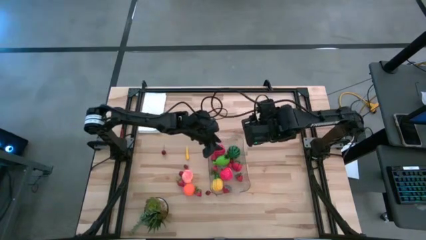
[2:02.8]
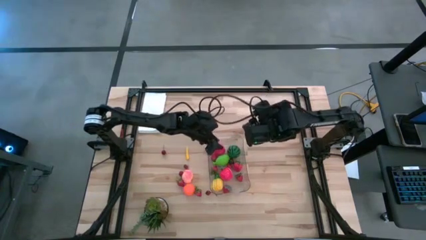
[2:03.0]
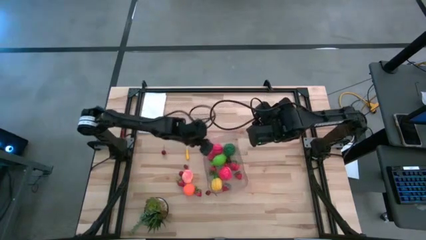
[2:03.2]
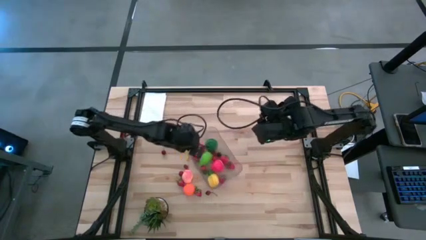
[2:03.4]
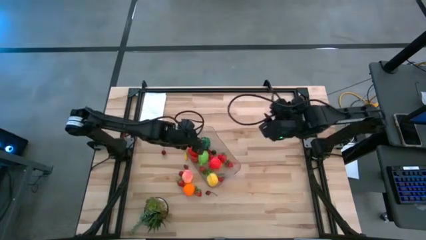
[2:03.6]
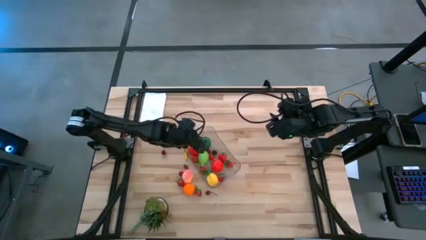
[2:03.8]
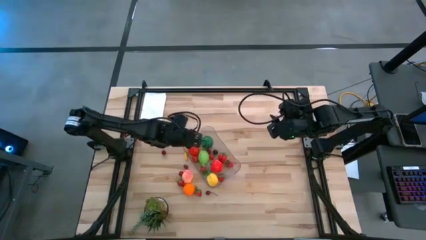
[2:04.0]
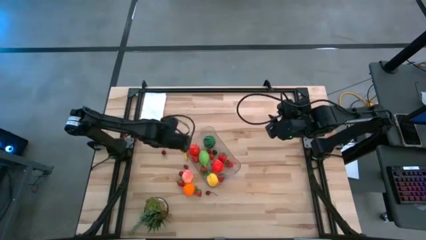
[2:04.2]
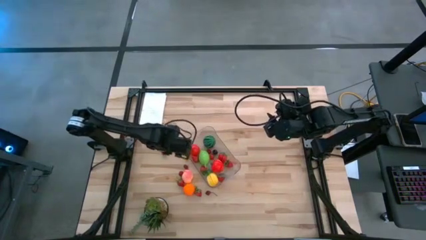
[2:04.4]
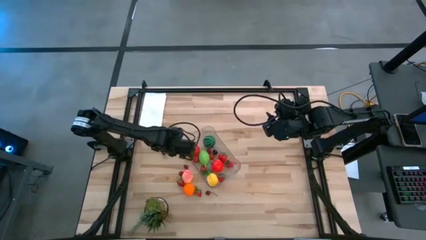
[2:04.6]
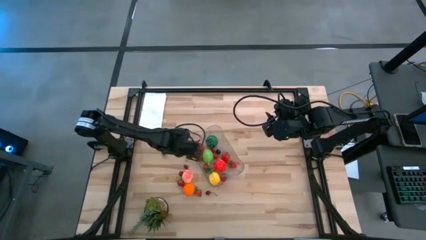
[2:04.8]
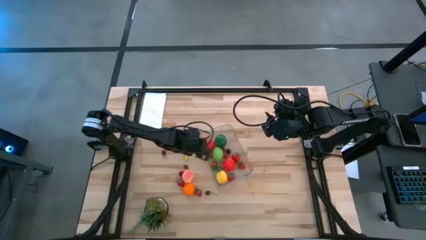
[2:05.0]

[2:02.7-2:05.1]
Task: Pick and placing Produce into tupperware
Adjust the transparent bin

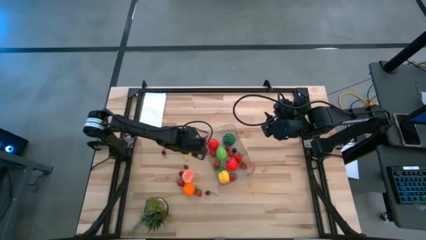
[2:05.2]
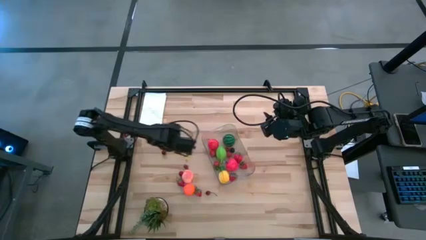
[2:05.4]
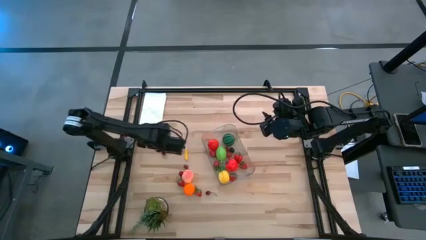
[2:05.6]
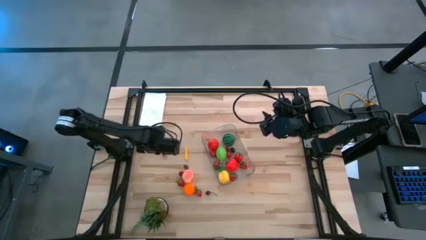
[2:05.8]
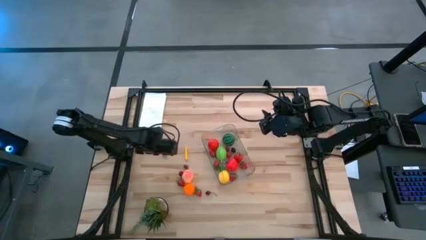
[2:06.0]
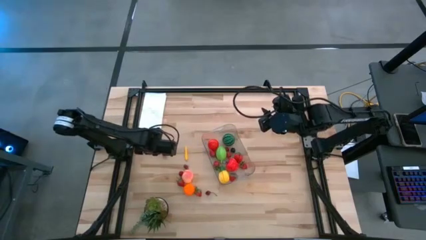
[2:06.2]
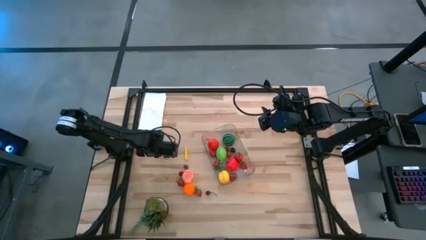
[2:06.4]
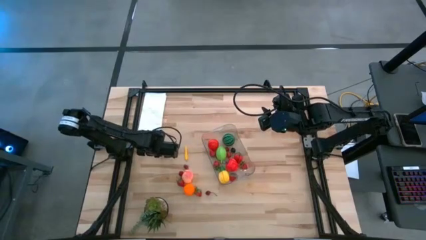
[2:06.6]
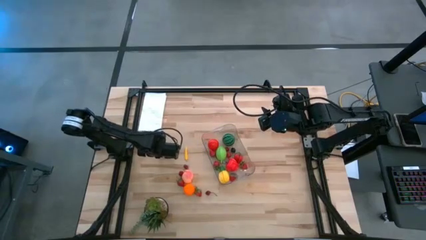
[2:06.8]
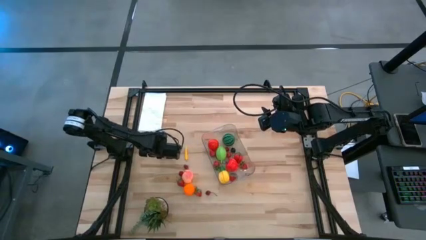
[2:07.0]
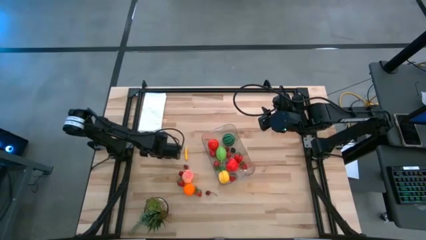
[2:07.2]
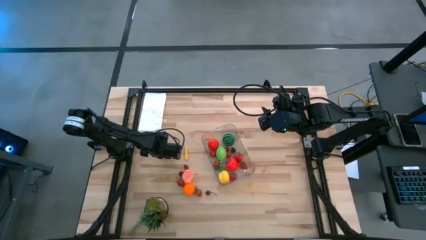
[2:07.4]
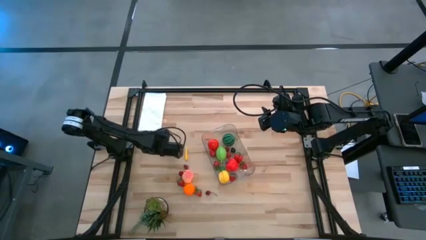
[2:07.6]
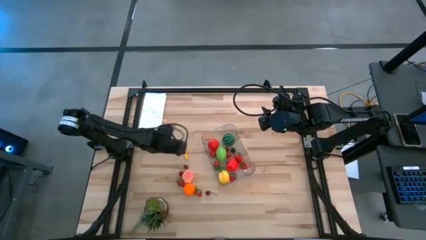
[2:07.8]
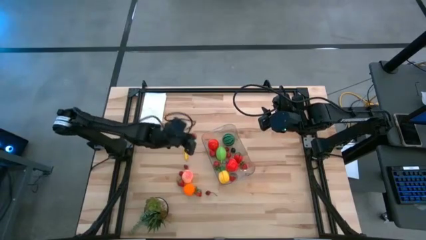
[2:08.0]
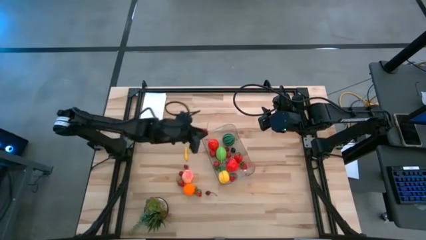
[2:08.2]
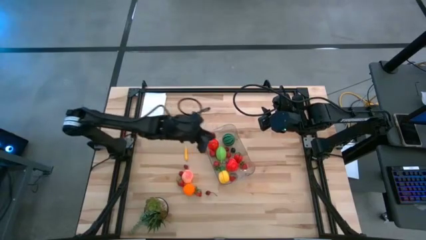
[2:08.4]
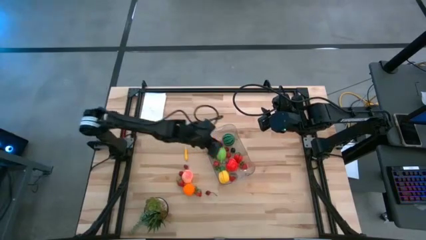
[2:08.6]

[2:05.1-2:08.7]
Put the red cherry into the transparent bin

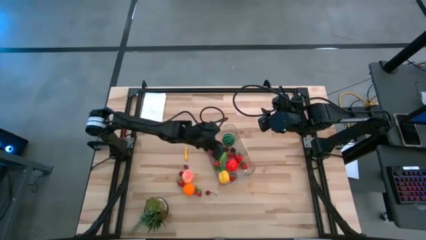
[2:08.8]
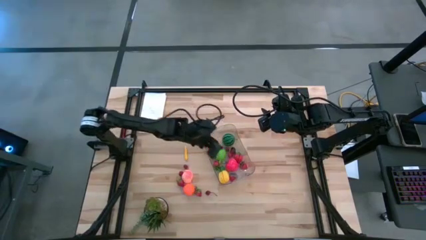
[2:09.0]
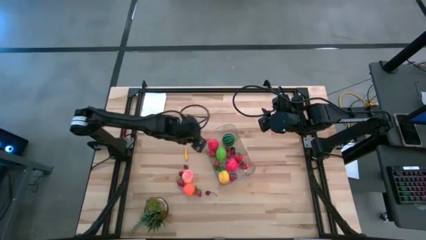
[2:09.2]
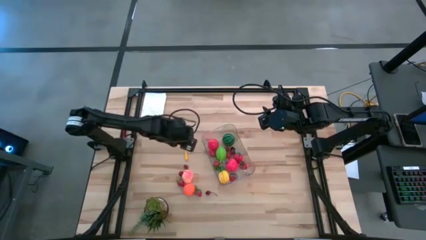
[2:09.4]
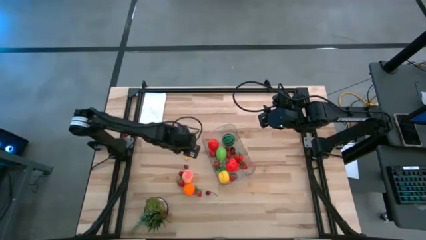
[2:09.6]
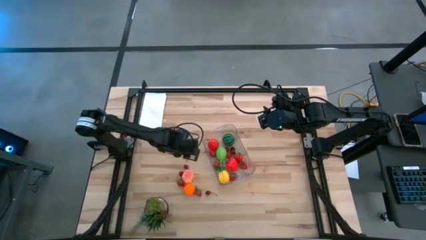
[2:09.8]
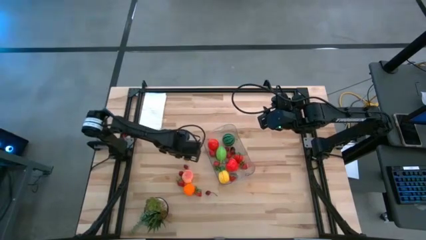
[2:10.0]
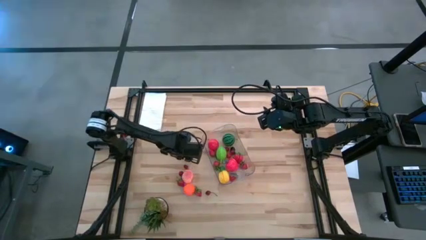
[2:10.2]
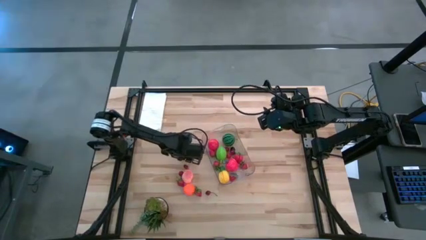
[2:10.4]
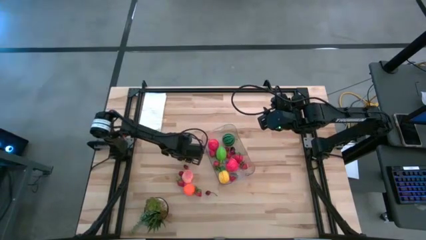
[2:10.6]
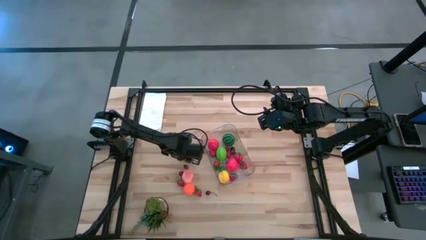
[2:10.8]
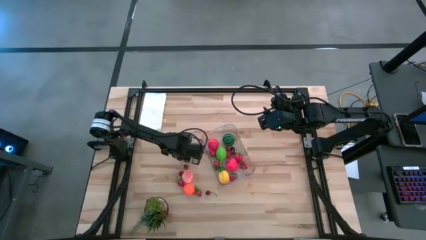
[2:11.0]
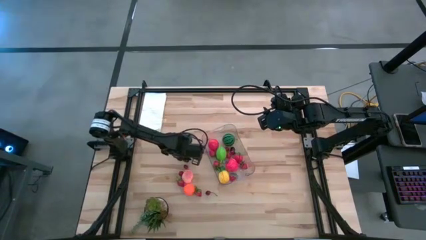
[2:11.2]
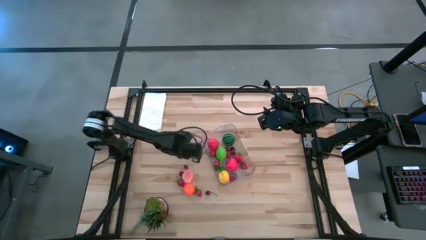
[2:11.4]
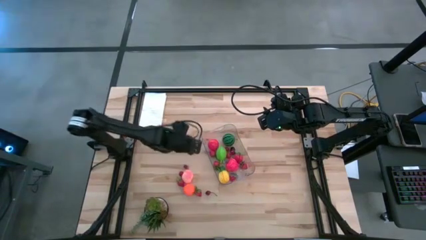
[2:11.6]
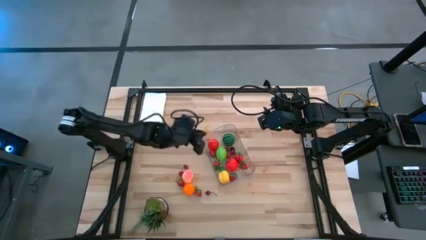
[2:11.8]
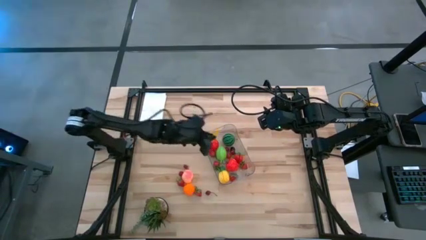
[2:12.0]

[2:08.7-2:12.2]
Put the corn into the transparent bin

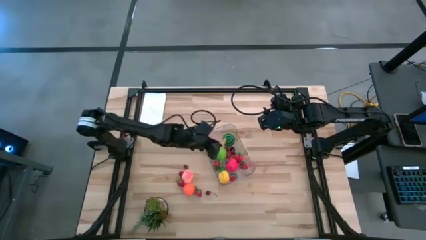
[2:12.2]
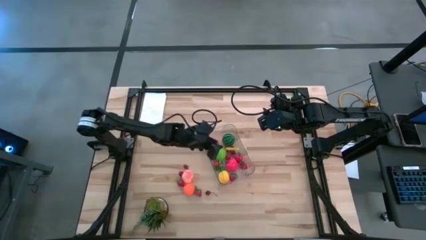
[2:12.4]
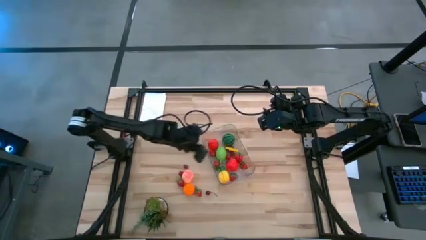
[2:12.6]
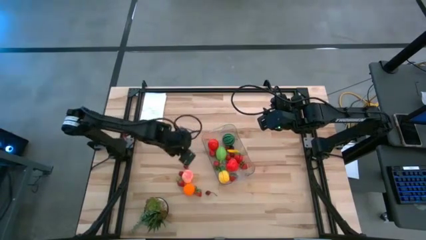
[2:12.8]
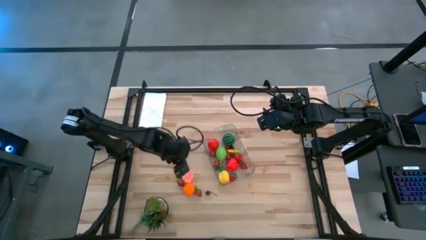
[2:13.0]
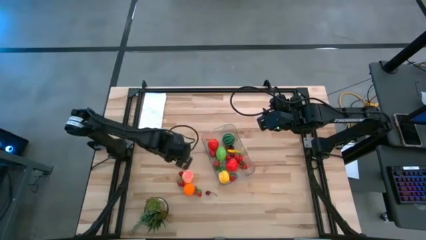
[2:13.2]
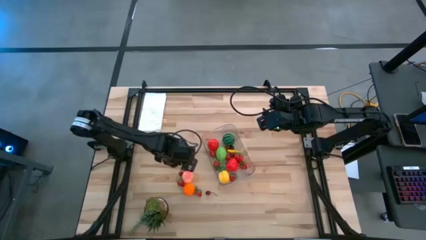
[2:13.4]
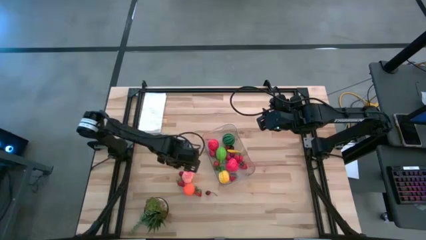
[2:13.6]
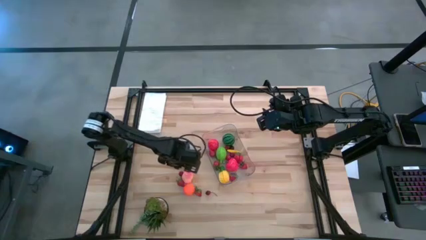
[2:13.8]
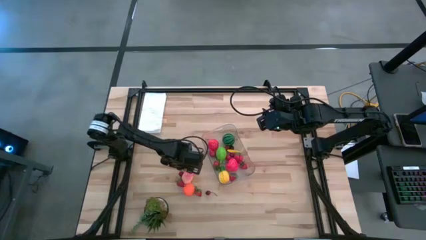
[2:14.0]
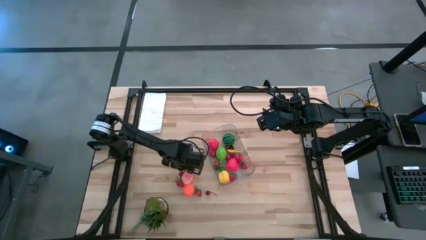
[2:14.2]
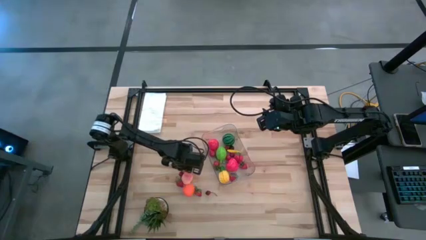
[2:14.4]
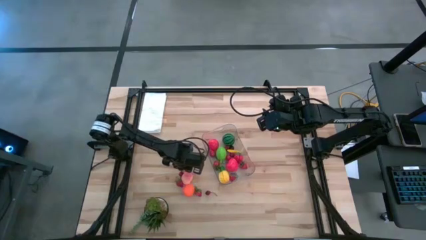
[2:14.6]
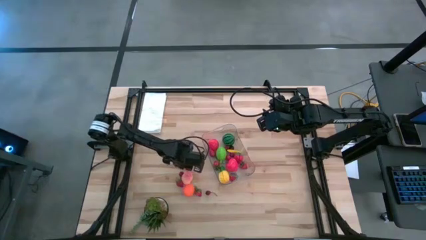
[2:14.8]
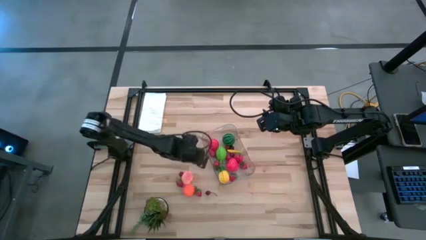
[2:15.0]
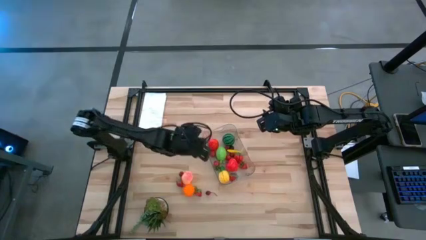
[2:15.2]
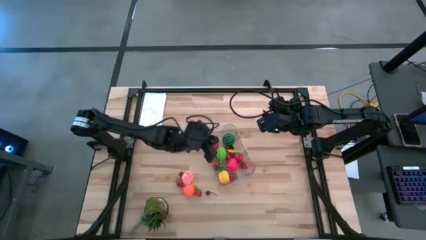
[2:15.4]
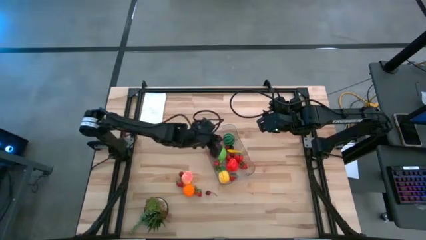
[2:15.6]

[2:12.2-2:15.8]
Put the red cherry into the transparent bin

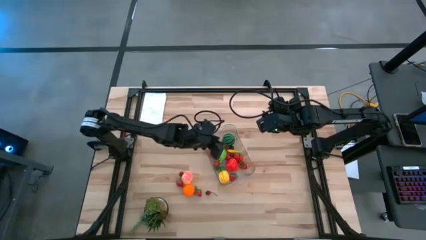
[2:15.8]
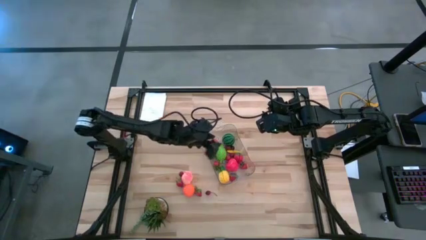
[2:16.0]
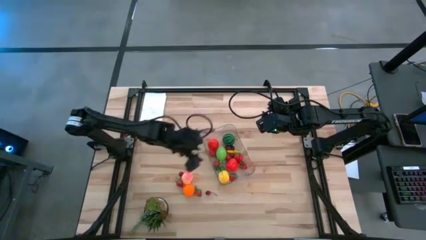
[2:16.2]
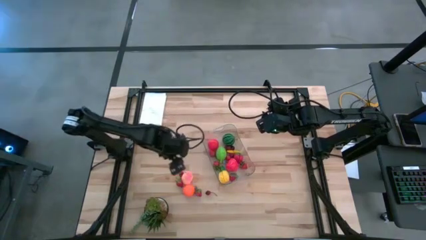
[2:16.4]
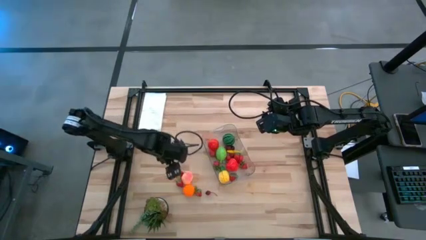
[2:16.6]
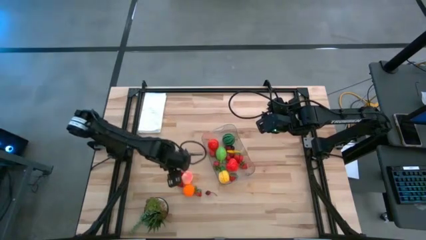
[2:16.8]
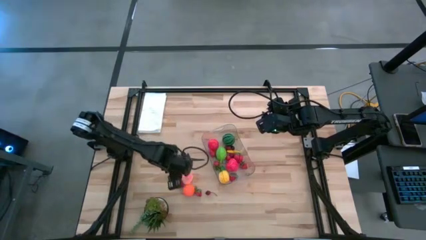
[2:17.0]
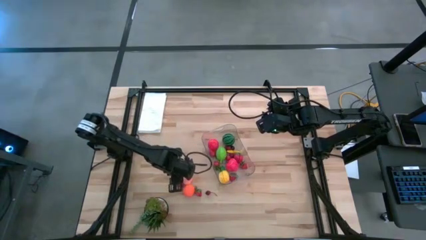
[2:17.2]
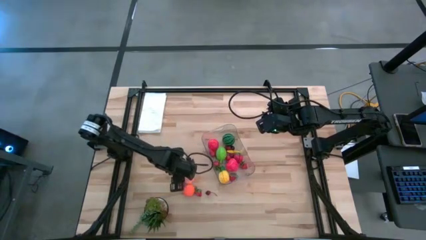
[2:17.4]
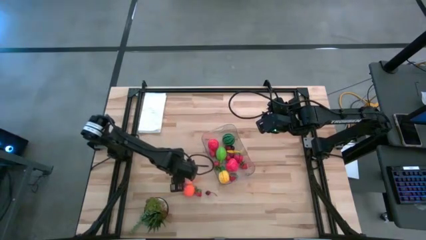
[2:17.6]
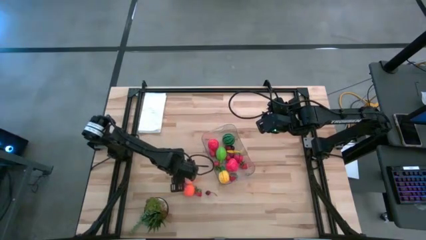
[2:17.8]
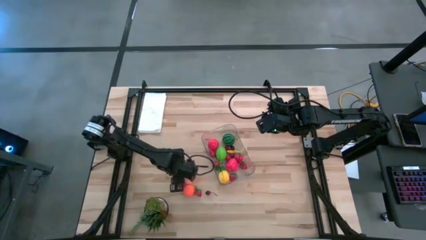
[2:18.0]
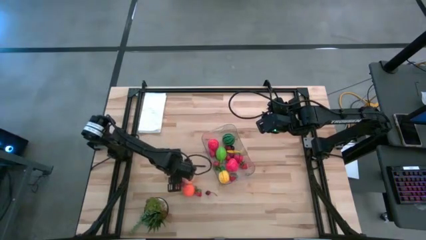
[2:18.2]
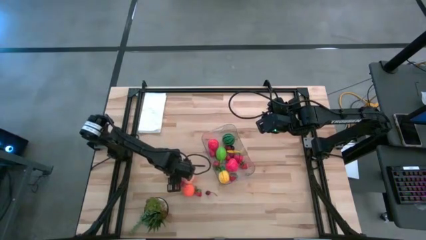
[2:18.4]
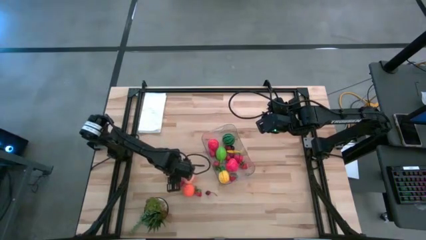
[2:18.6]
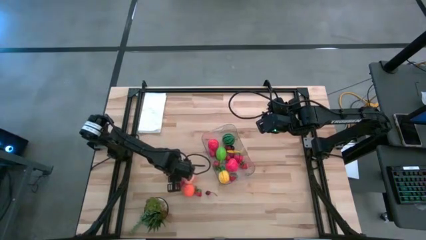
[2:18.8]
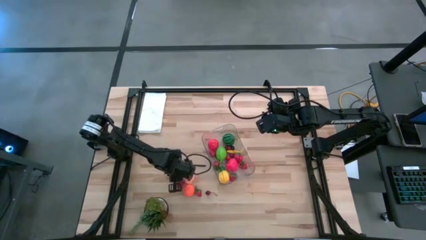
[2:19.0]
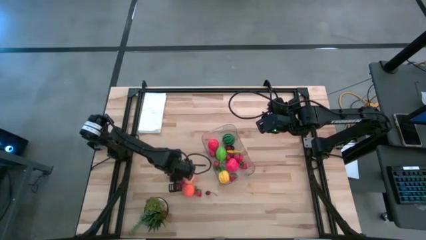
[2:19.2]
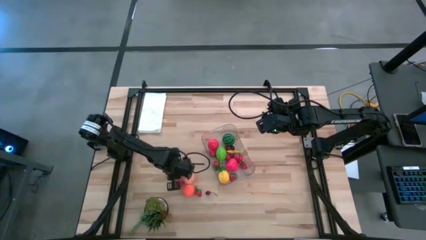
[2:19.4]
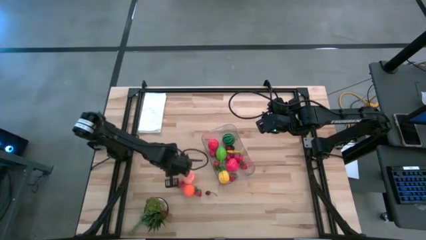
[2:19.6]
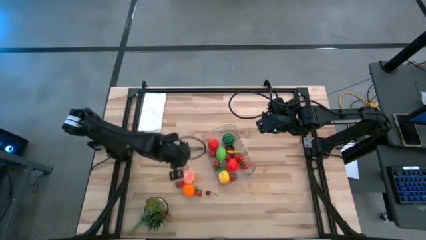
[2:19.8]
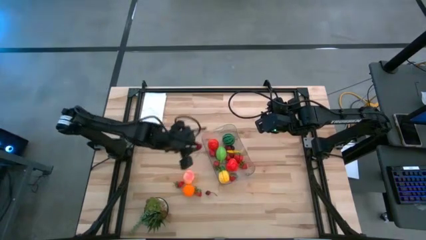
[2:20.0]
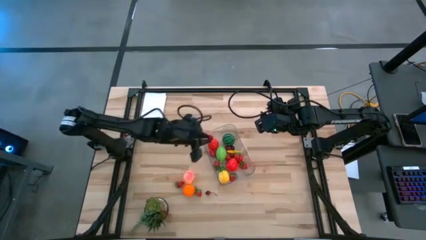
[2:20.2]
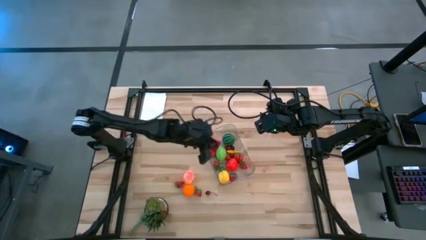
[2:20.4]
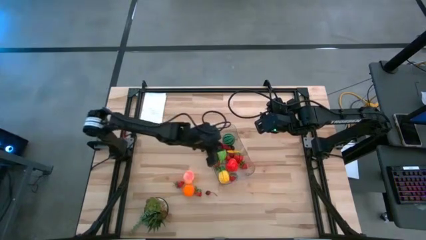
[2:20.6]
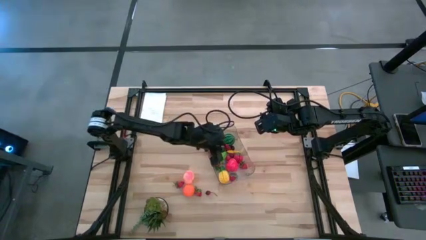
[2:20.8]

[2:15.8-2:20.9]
Put the red cherry into the transparent bin
